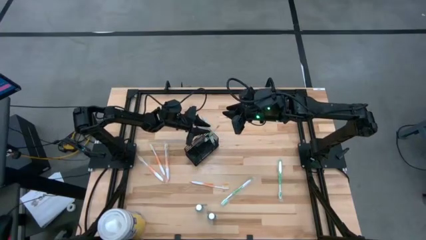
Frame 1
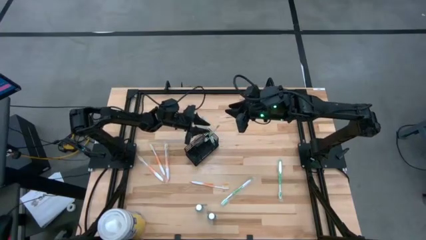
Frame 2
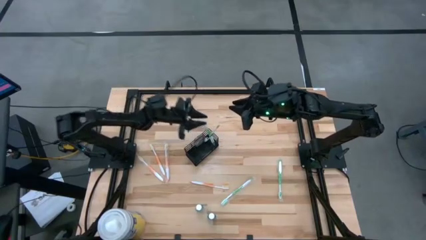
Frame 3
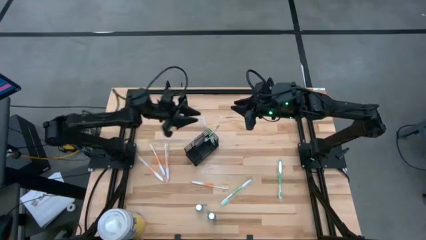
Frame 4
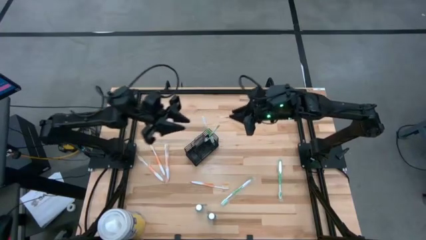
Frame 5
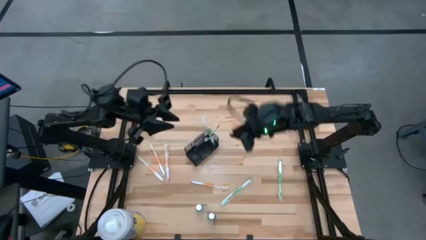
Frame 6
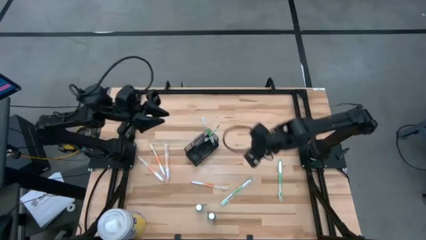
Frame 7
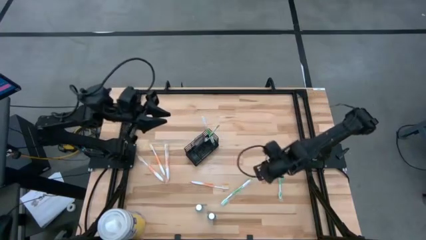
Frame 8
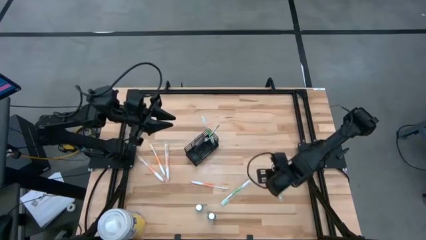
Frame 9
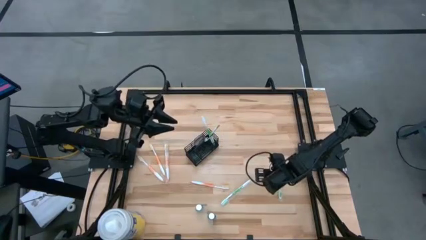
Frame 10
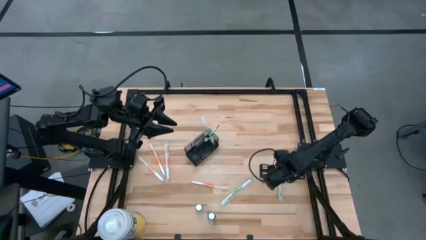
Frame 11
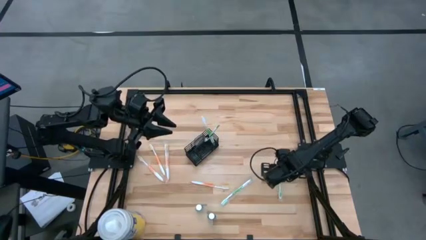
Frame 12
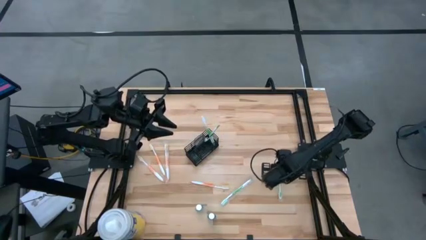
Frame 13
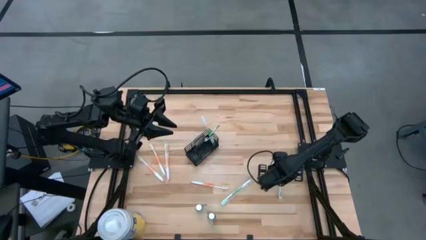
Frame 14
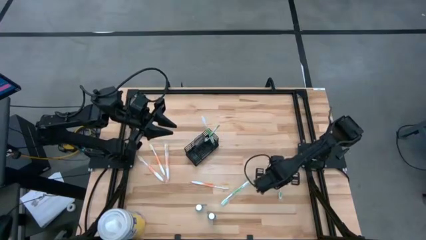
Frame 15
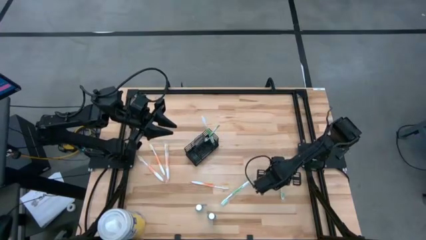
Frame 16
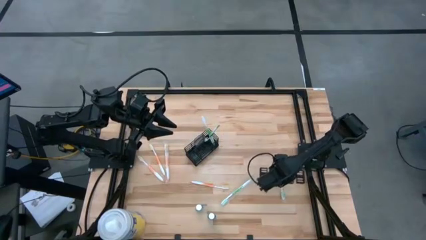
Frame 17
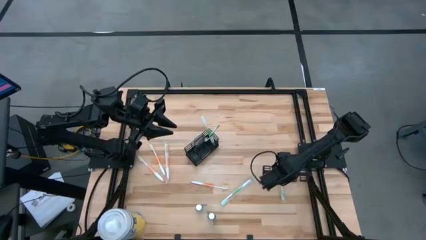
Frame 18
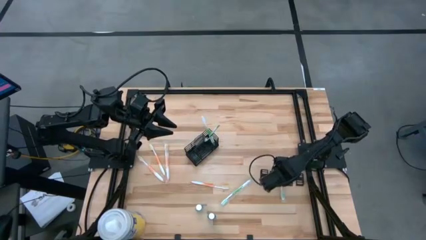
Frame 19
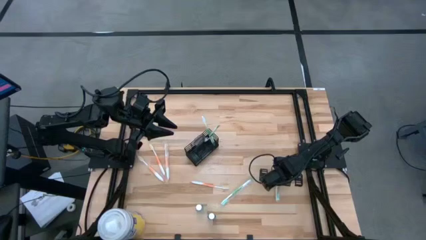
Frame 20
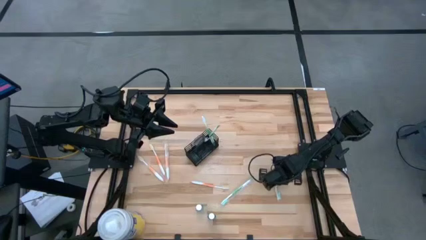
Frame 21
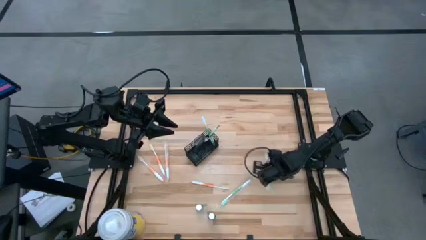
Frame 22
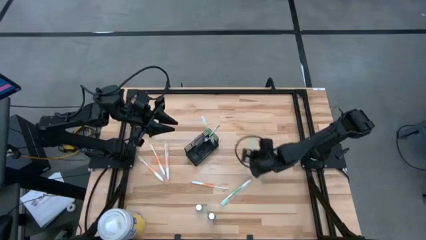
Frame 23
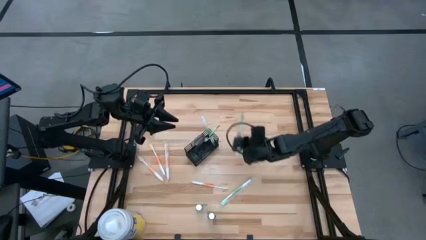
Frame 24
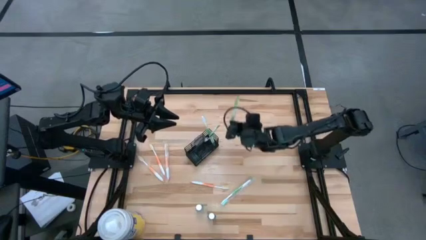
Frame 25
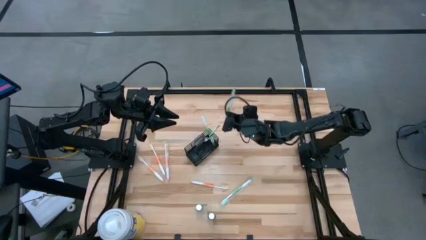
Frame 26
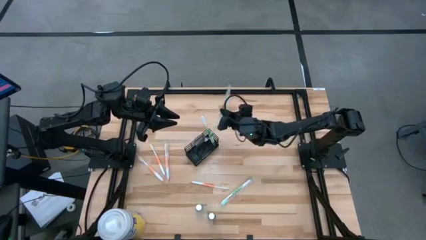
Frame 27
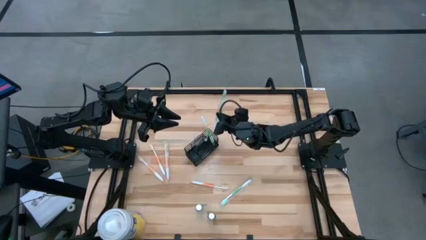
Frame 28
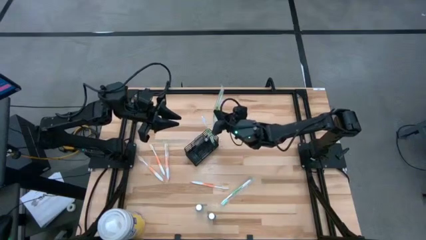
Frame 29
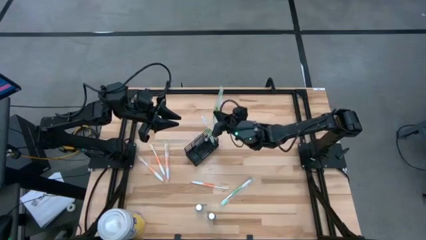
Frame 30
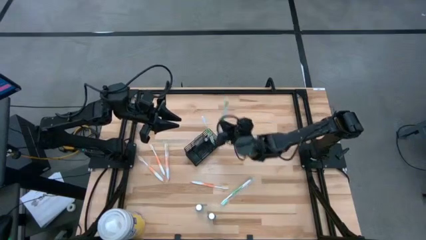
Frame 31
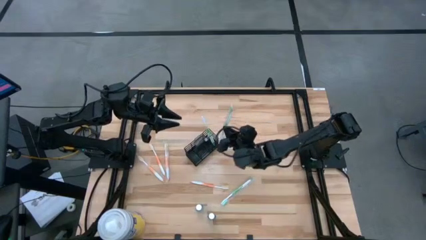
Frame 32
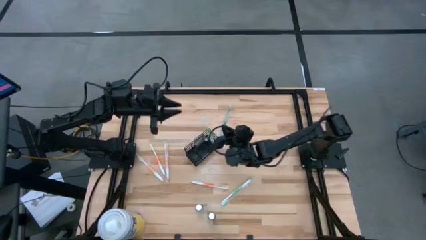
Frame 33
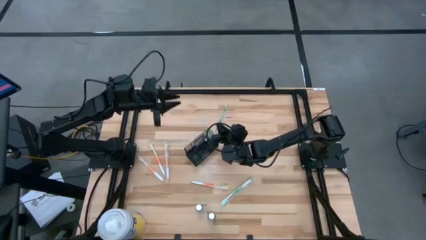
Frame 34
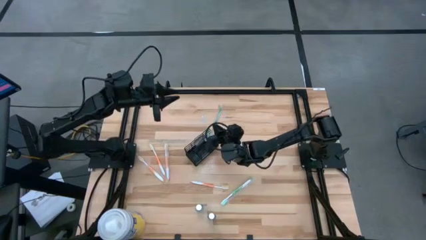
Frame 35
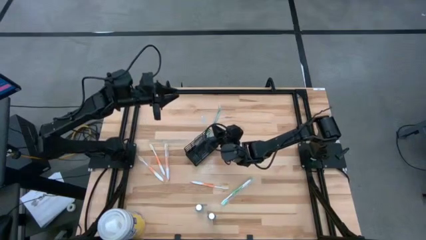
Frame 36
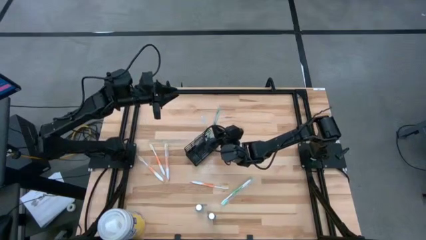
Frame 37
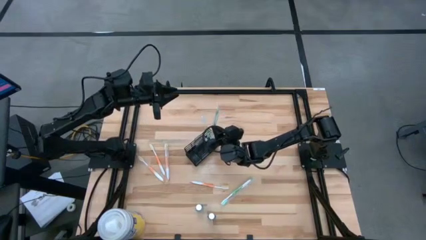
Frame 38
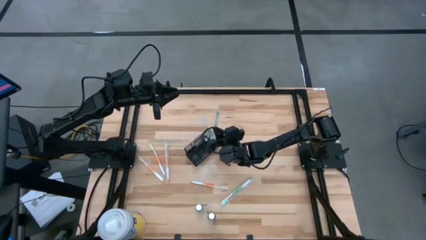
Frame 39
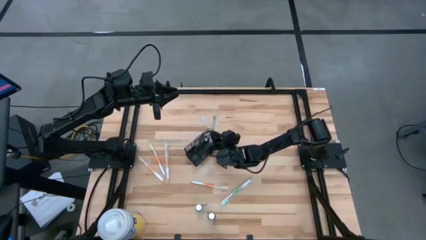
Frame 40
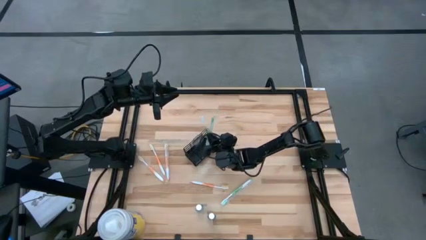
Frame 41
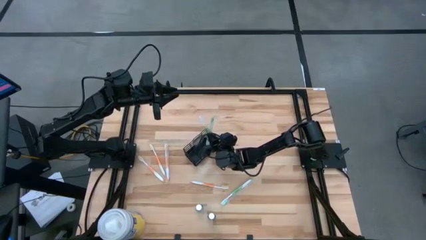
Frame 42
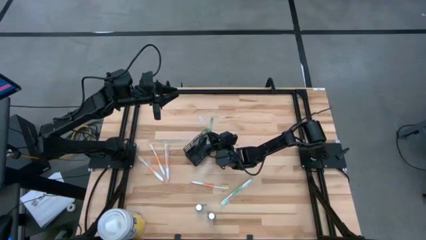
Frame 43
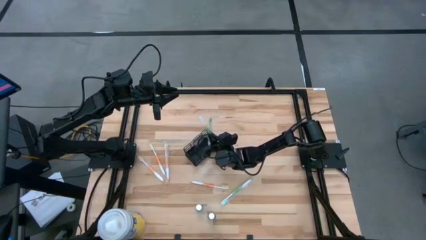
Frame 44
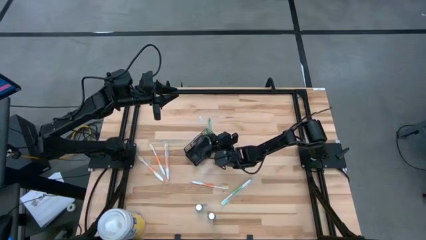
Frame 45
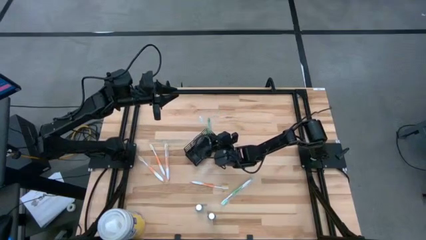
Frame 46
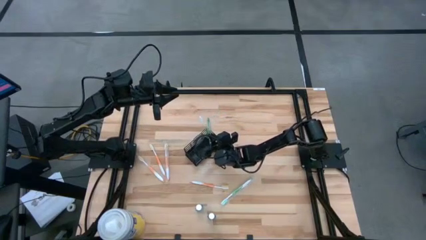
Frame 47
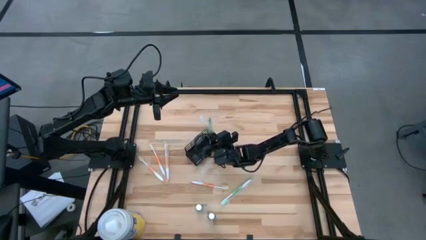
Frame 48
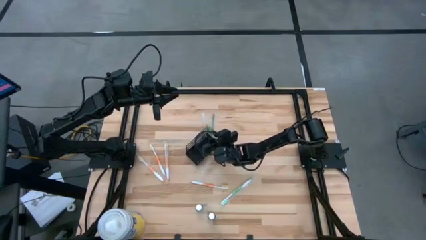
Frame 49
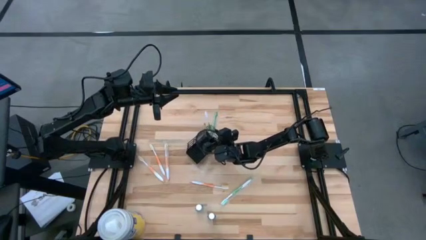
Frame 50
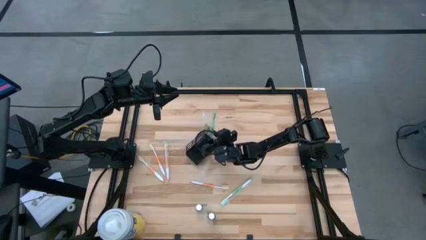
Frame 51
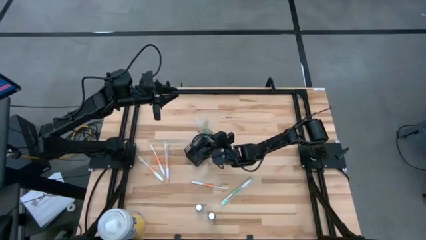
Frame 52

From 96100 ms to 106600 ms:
Task: Pick & Place toothbrushing station
Put the right green toothbrush into the wire organizer

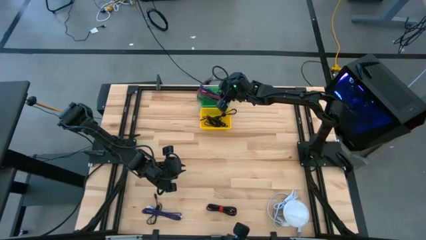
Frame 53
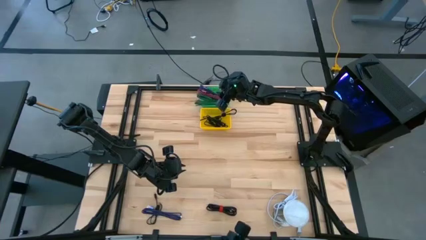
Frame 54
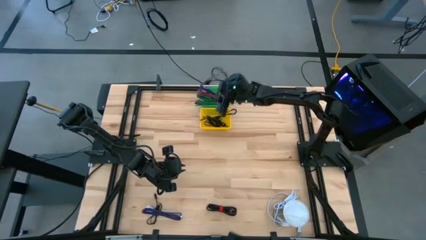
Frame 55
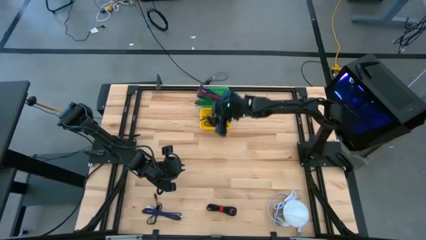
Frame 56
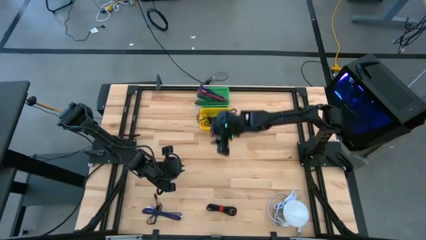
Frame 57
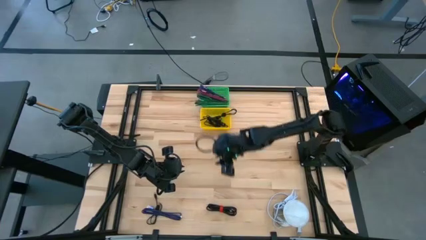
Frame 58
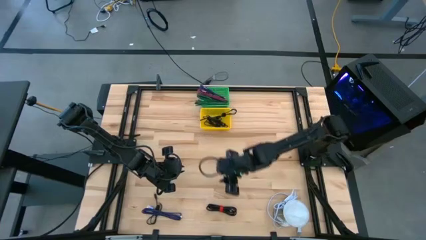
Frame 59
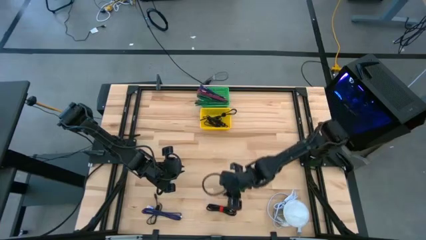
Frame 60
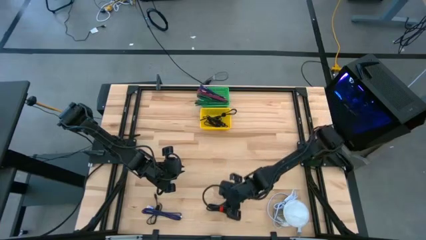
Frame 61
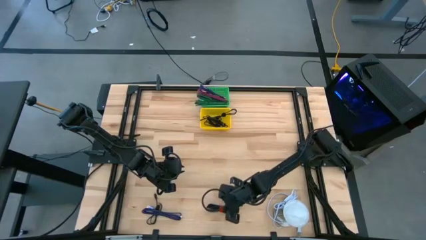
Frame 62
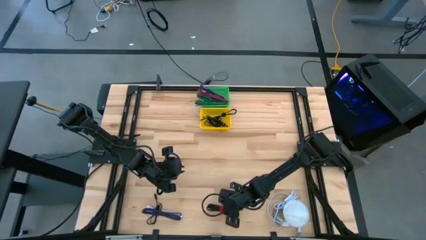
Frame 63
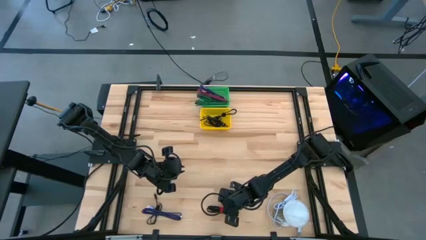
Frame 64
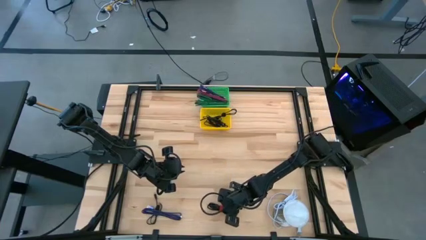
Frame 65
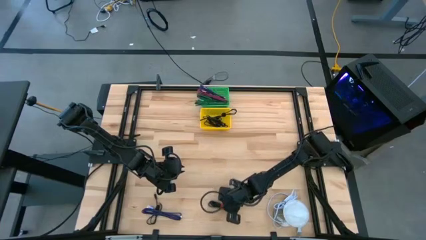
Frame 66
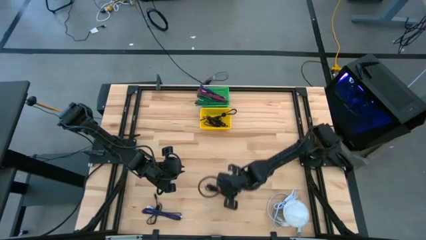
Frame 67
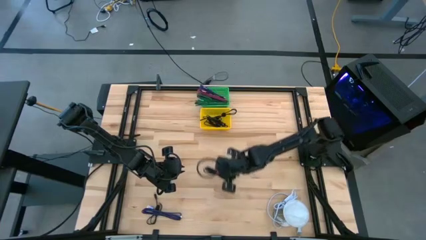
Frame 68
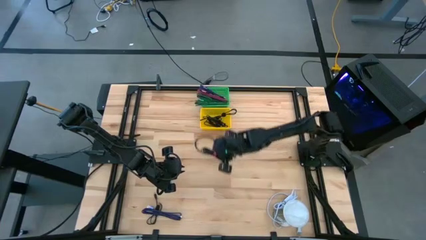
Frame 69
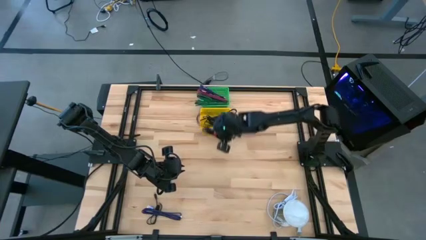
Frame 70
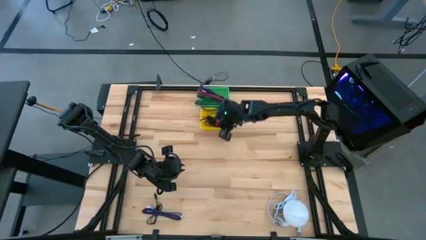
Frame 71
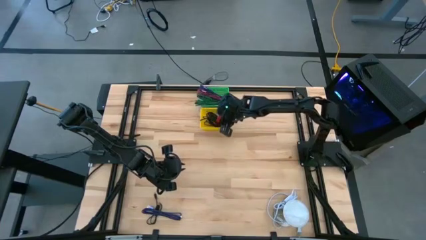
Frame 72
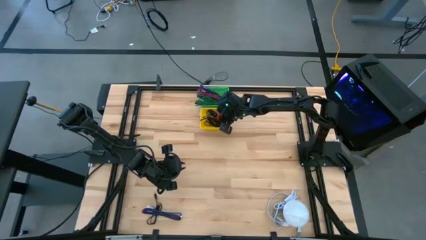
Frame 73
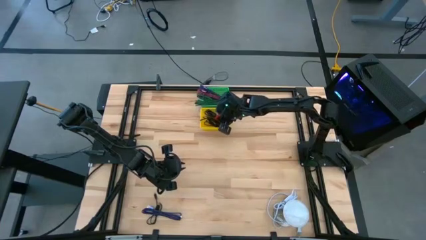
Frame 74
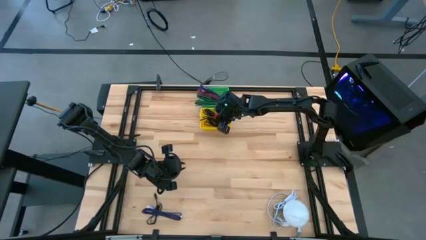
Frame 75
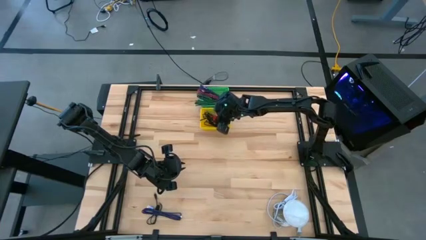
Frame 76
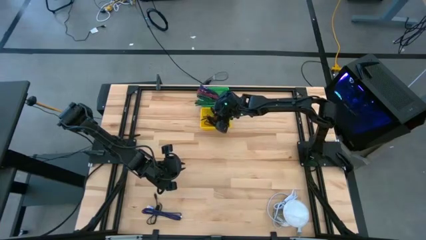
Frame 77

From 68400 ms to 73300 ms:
Task: Pick & Place USB Port
Put the bottom-middle black charger cable into the yellow basket
